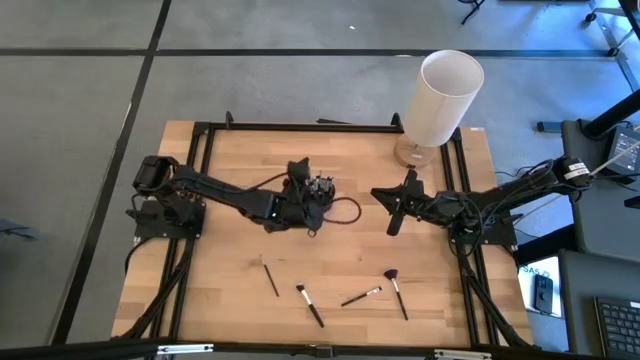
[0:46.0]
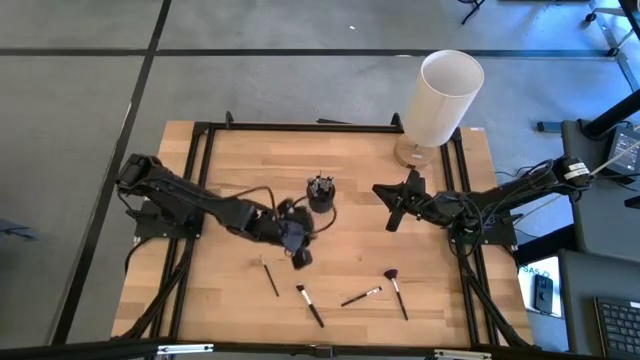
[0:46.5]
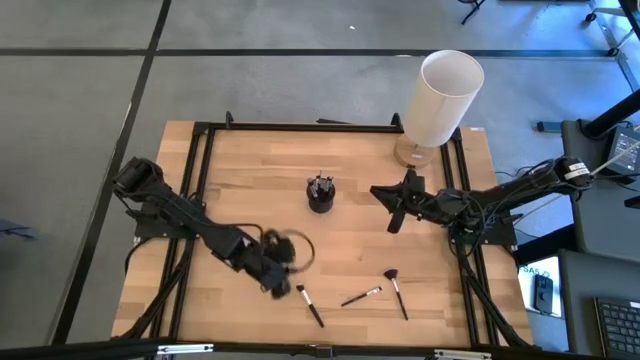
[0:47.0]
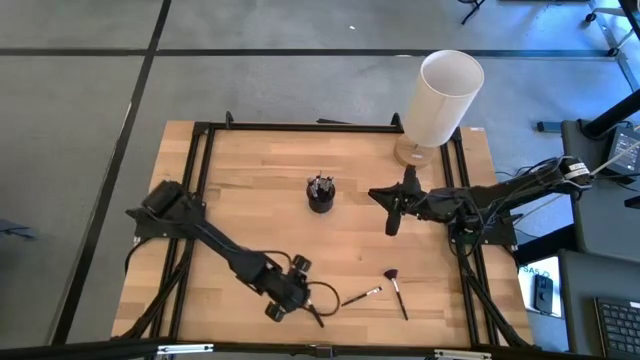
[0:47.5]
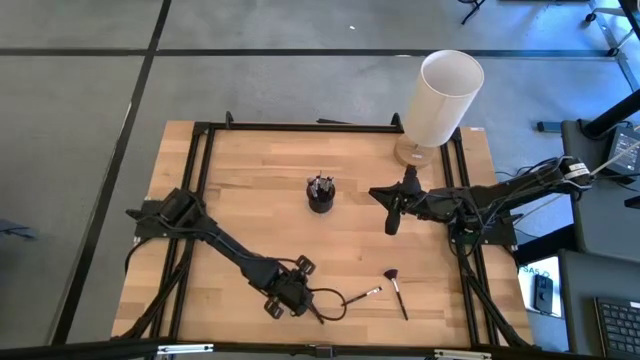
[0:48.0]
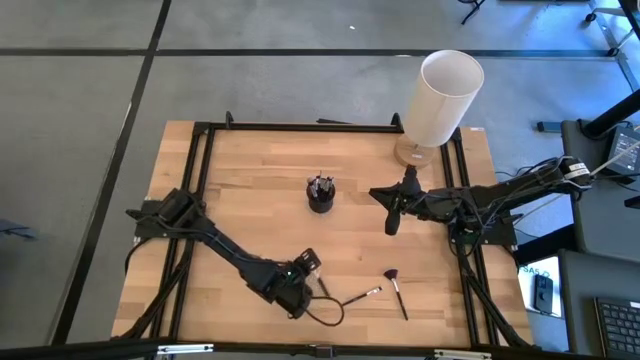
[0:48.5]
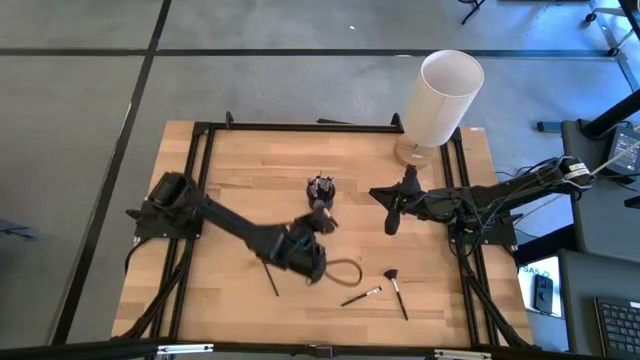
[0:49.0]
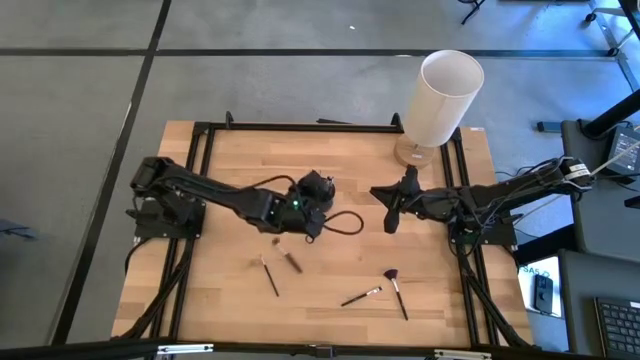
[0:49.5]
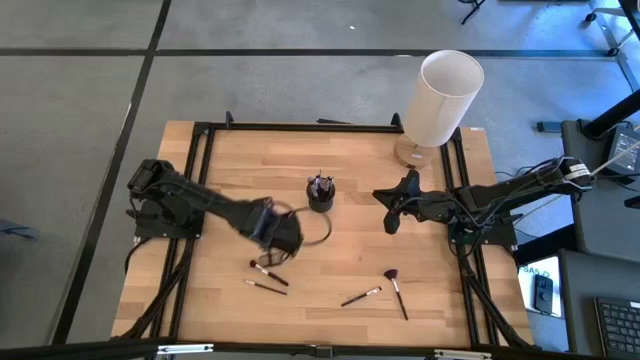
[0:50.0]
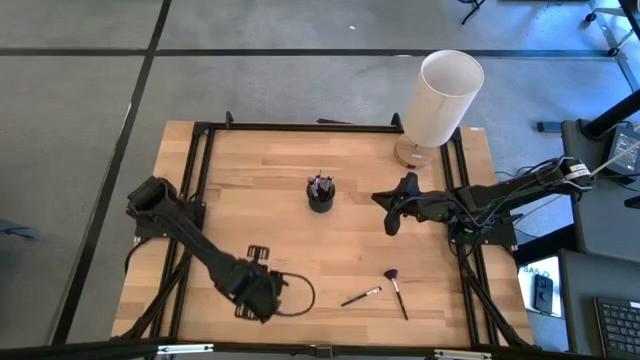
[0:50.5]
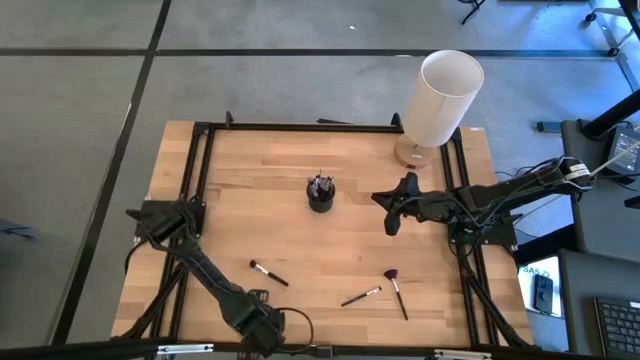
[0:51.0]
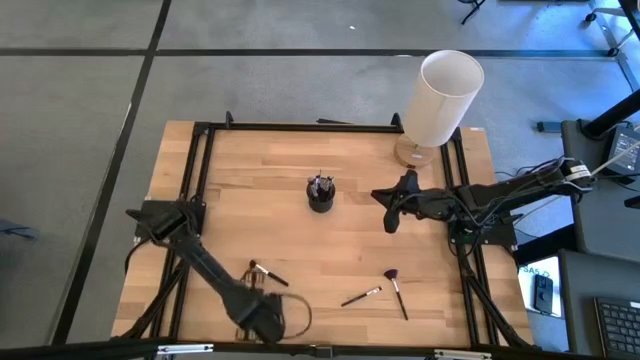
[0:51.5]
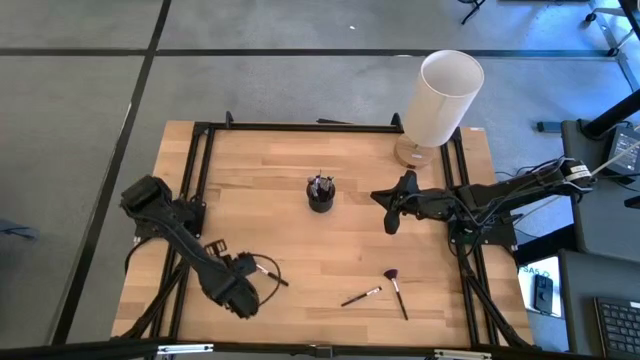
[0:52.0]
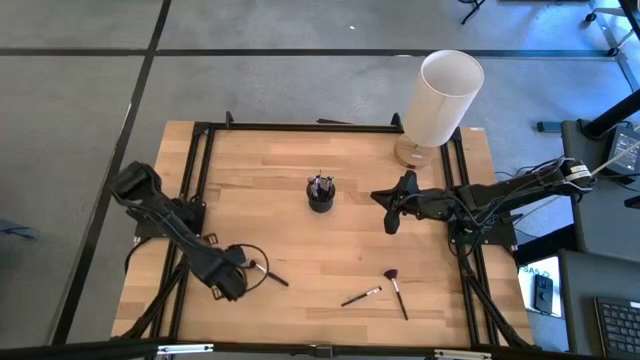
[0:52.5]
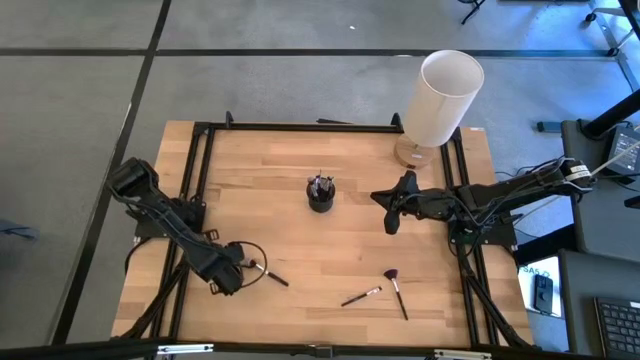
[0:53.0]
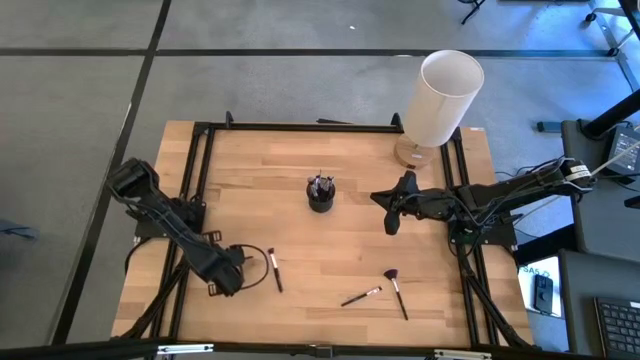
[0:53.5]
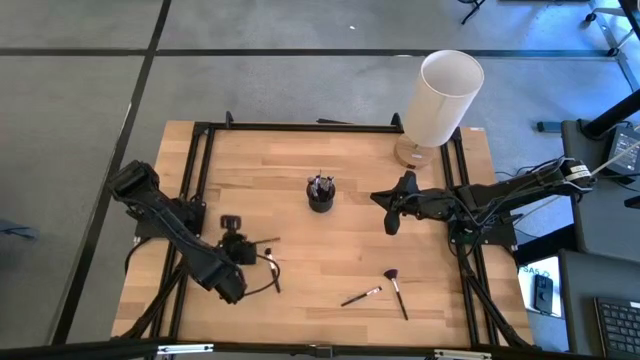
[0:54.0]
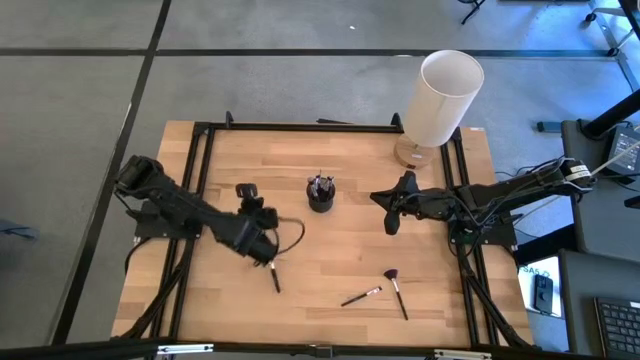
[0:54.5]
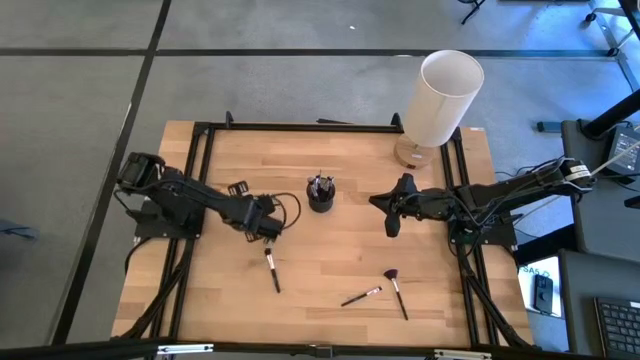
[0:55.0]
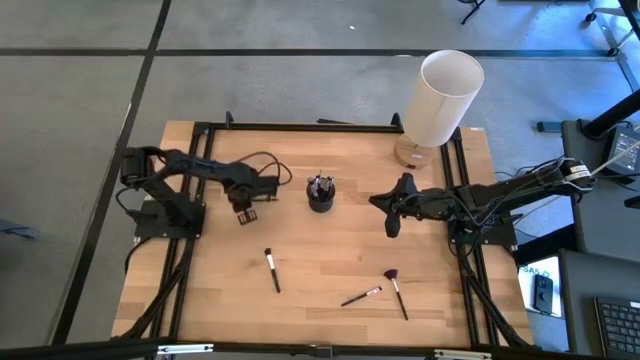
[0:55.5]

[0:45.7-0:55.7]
Task: Sort items
Put the eyeshadow brush into the organizer

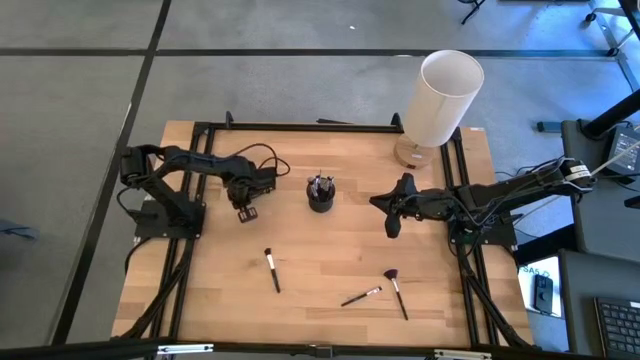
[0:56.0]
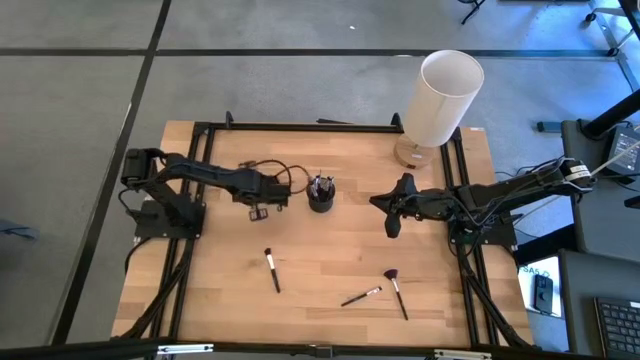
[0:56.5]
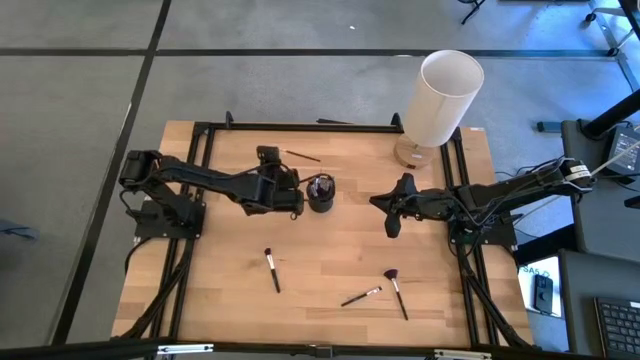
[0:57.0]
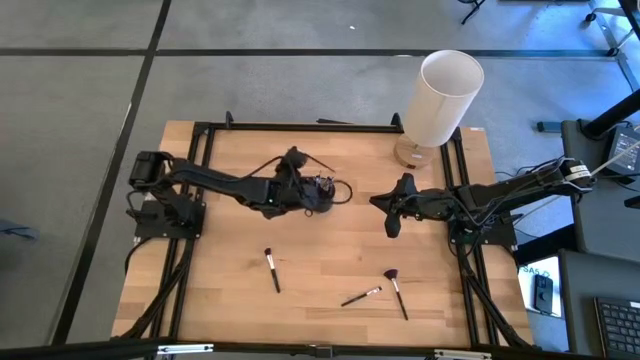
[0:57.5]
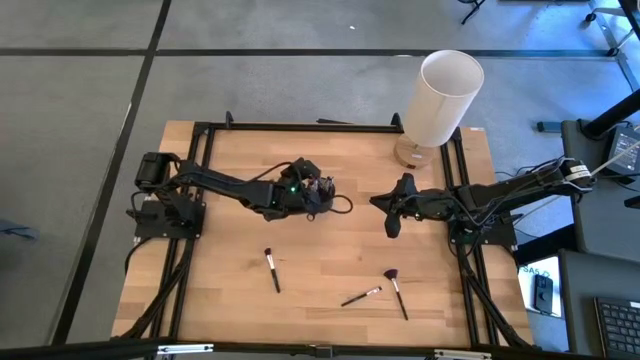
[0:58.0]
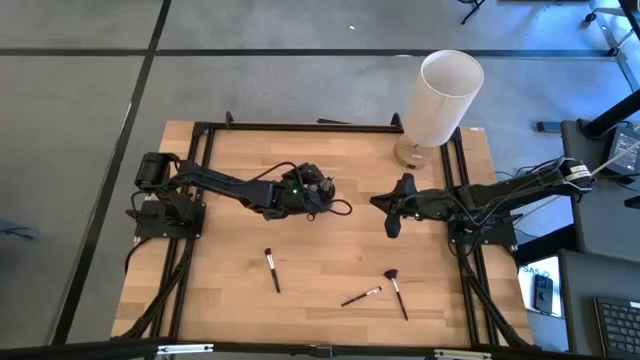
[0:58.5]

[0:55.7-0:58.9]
Put the eyeshadow brush into the organizer

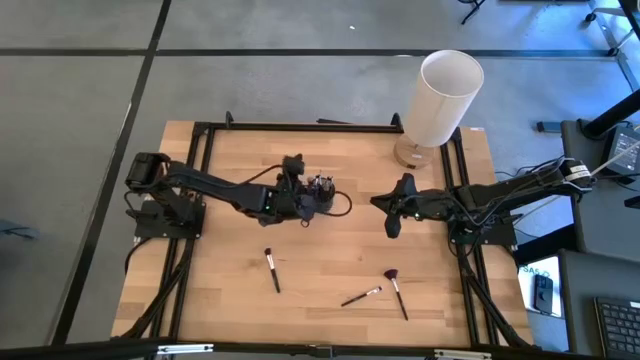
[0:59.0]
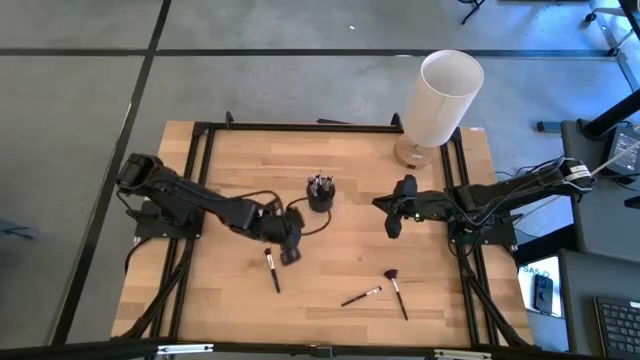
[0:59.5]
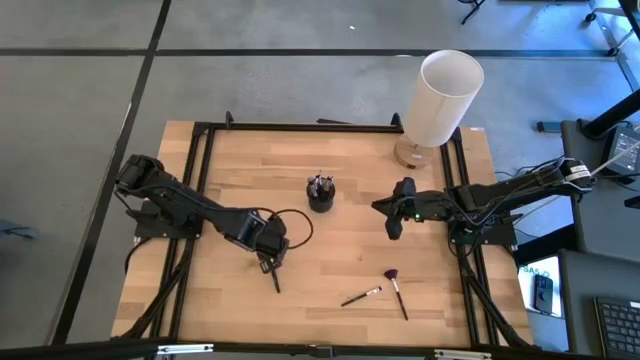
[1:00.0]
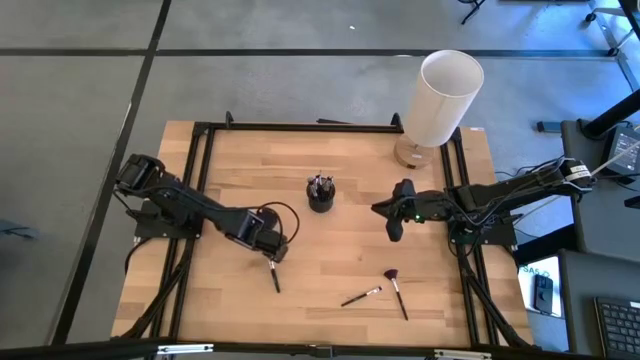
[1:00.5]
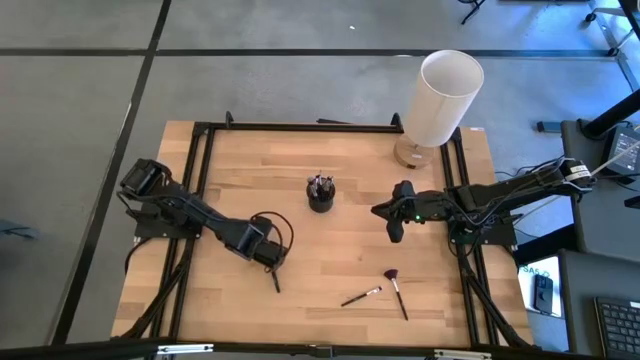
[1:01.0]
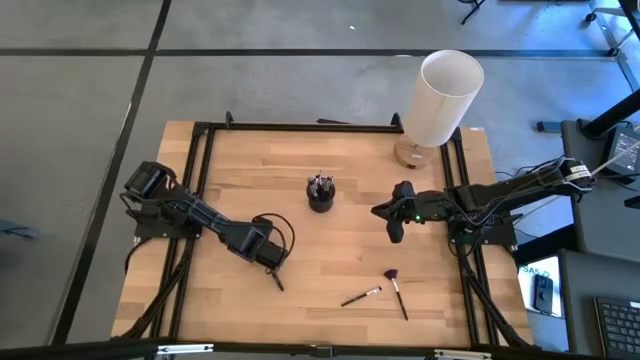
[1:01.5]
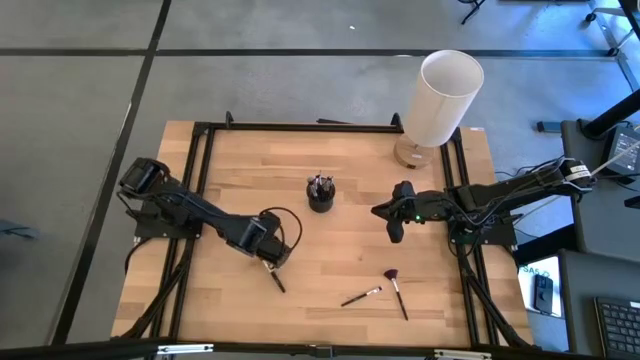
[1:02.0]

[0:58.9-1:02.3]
Put the powder brush into the organizer

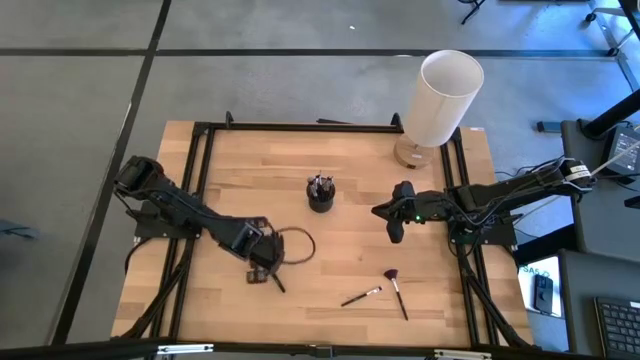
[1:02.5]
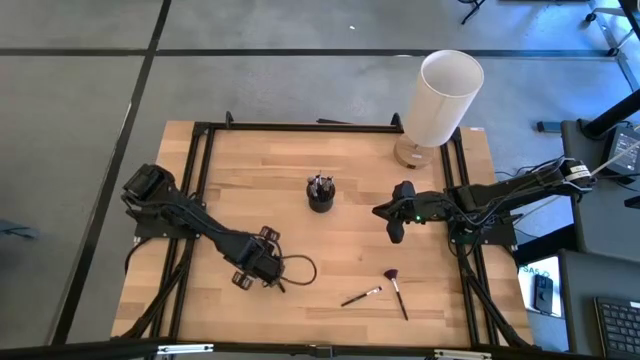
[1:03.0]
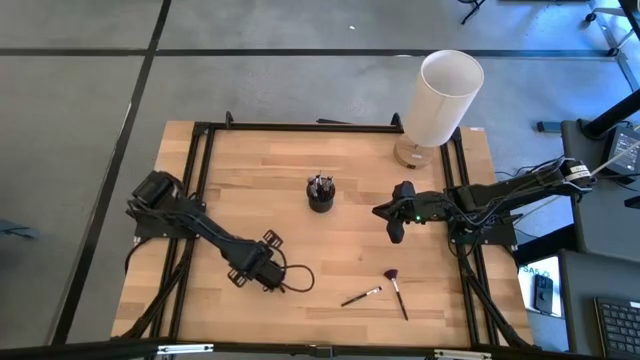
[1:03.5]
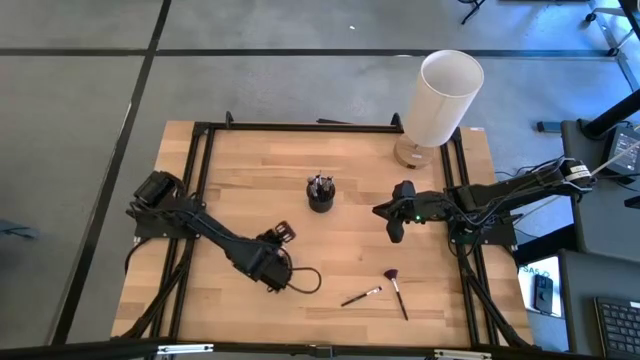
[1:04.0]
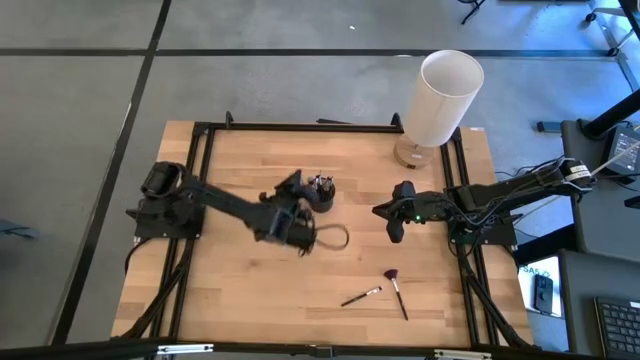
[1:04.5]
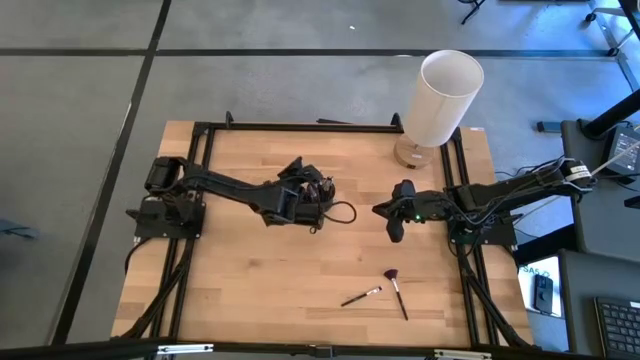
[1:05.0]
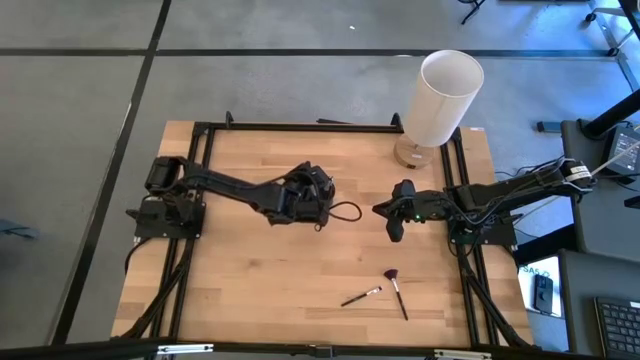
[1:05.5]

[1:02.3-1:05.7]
Put the powder brush into the organizer

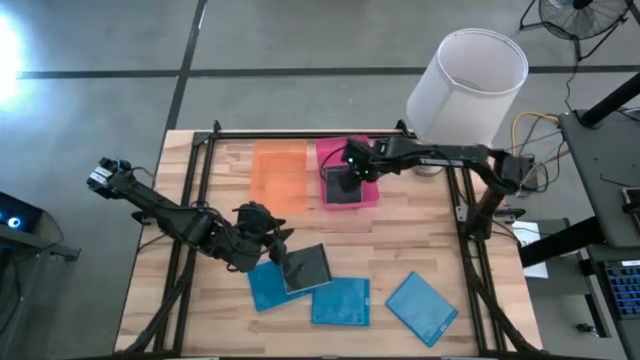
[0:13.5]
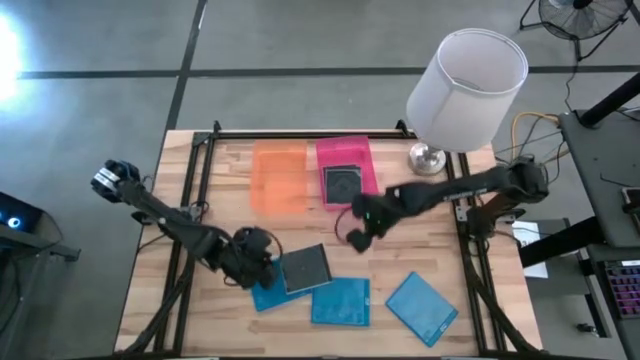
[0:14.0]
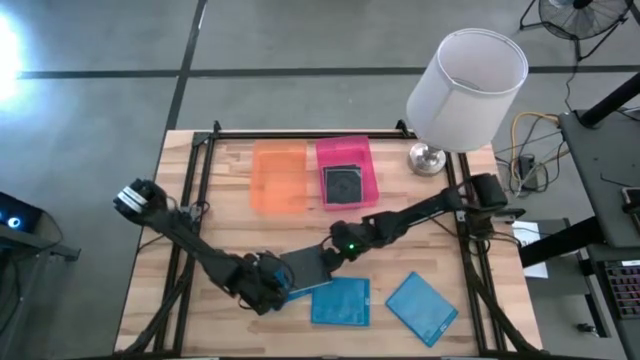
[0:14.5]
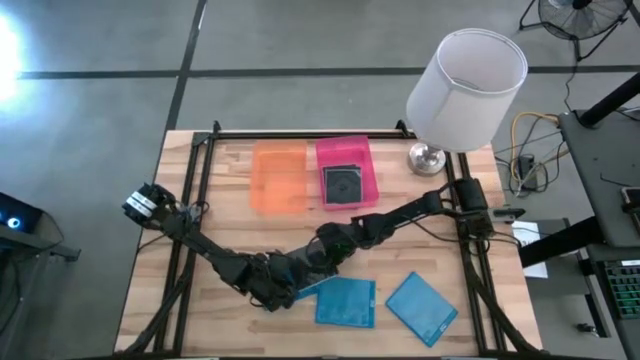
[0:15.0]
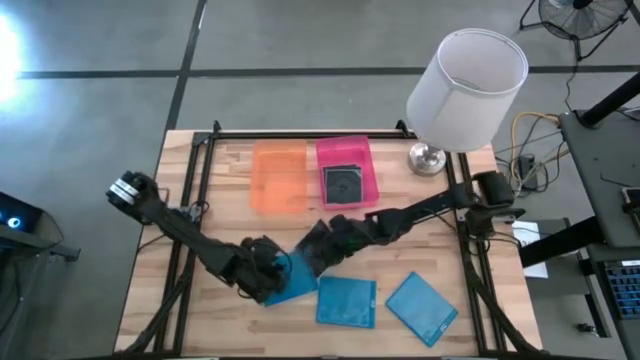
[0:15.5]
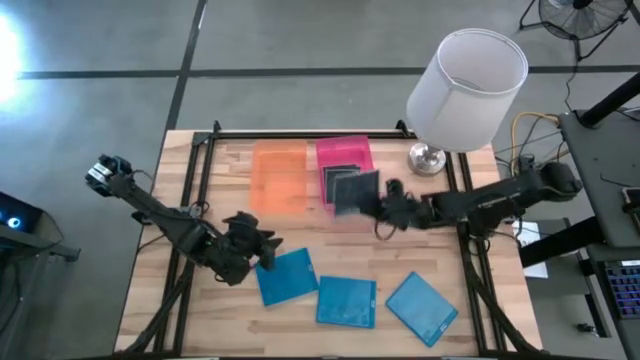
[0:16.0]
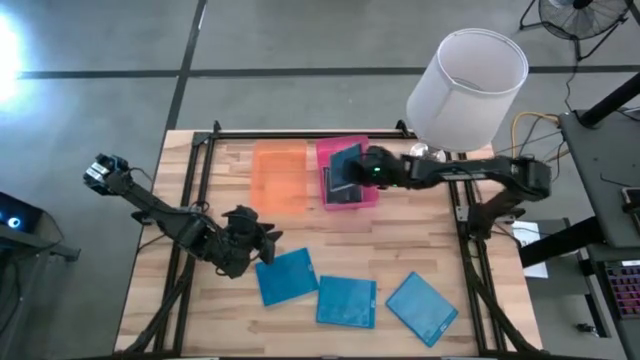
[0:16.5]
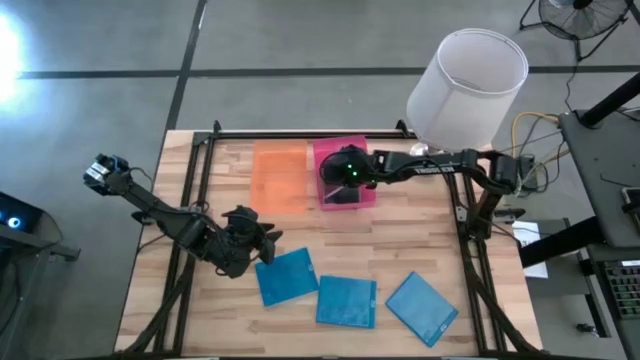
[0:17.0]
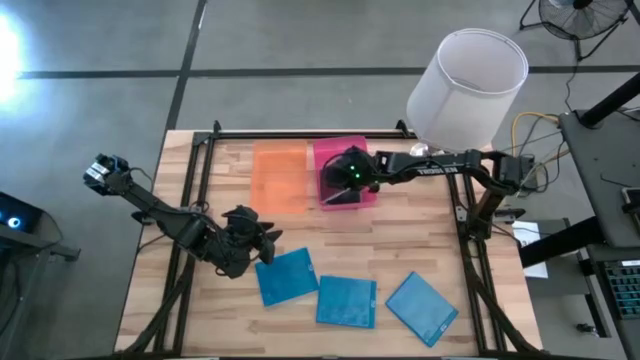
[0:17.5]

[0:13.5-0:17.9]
Task: Pick & place jewel cases by type
Put the black CD case into the pink bin
